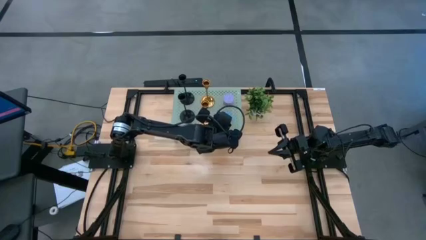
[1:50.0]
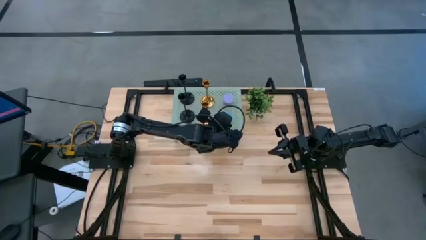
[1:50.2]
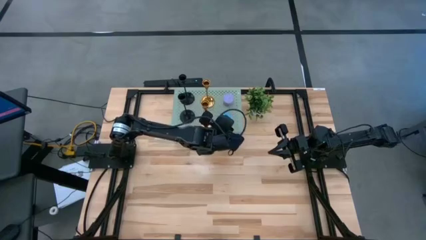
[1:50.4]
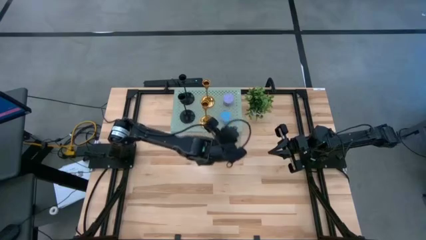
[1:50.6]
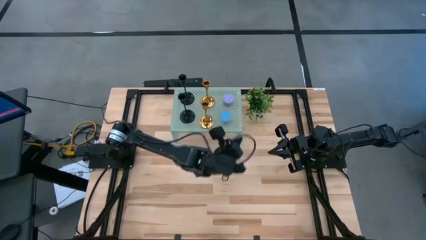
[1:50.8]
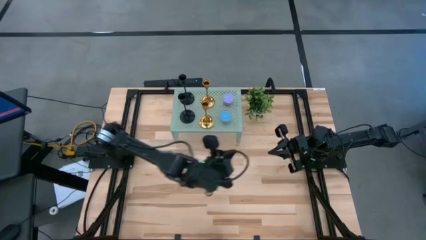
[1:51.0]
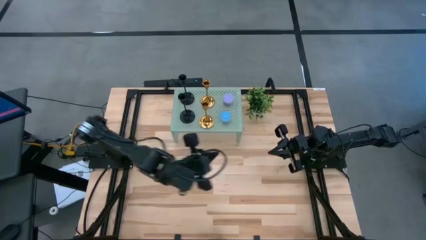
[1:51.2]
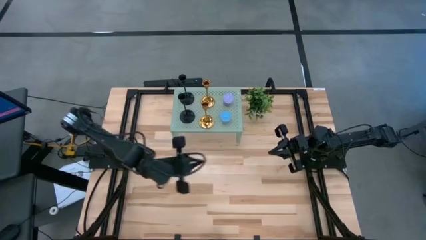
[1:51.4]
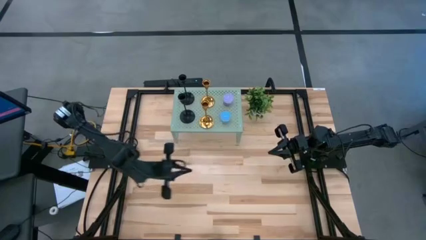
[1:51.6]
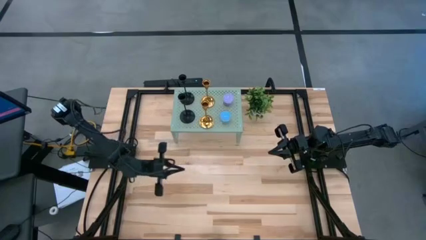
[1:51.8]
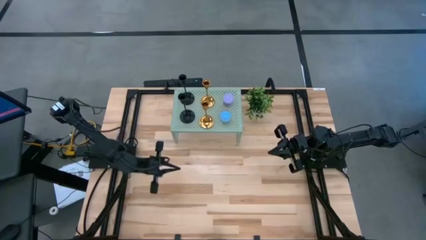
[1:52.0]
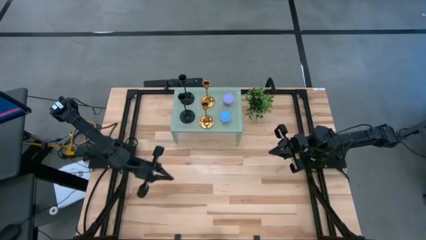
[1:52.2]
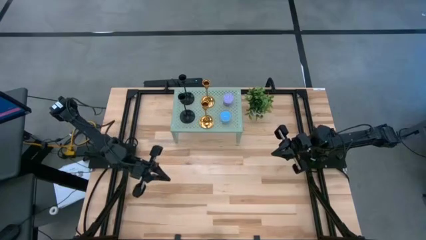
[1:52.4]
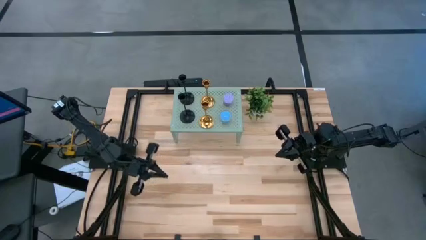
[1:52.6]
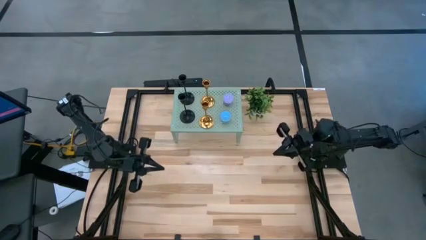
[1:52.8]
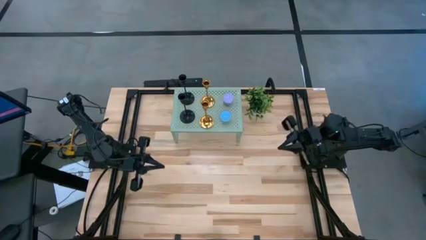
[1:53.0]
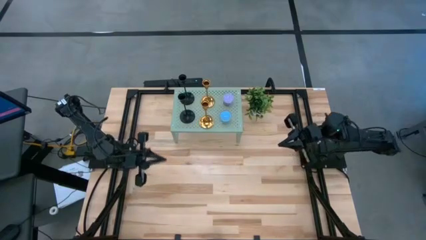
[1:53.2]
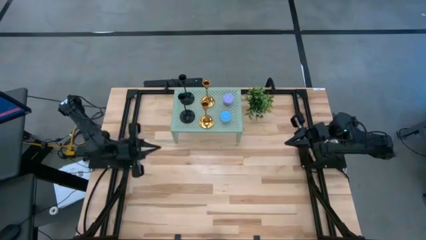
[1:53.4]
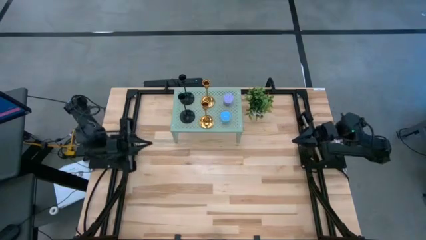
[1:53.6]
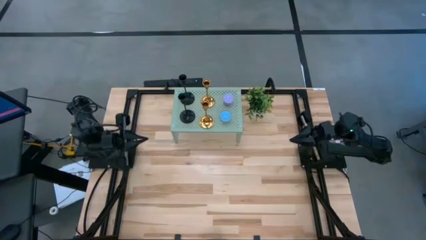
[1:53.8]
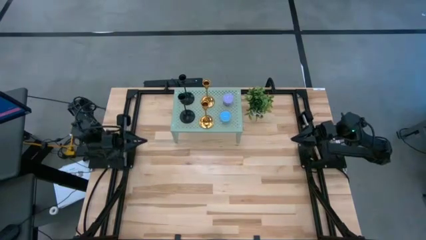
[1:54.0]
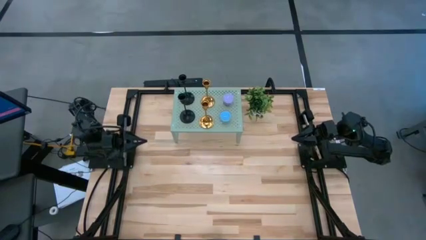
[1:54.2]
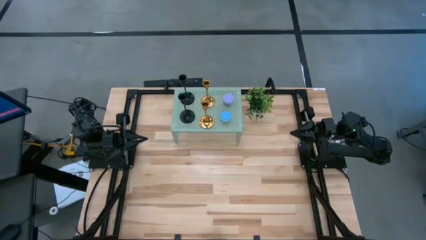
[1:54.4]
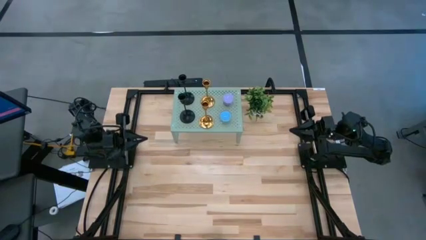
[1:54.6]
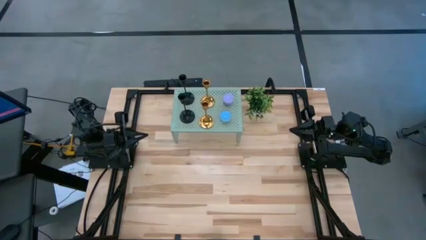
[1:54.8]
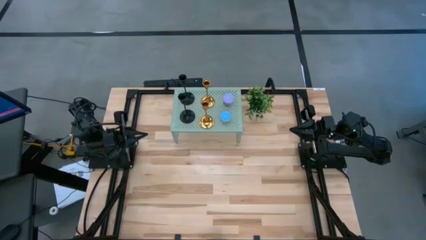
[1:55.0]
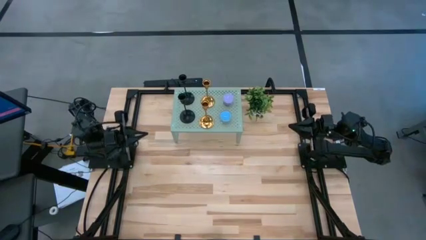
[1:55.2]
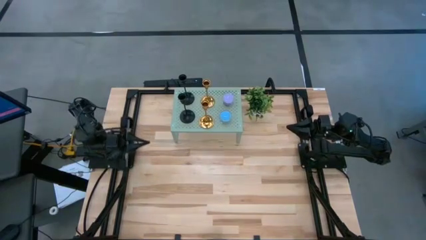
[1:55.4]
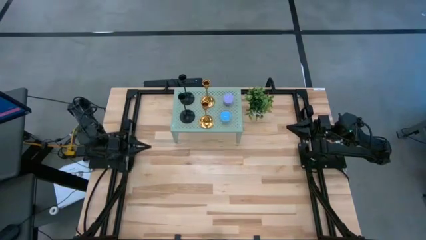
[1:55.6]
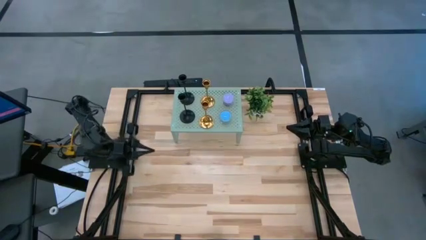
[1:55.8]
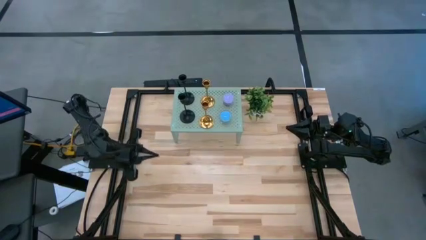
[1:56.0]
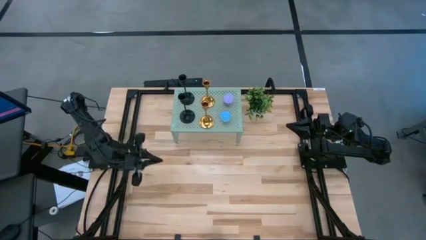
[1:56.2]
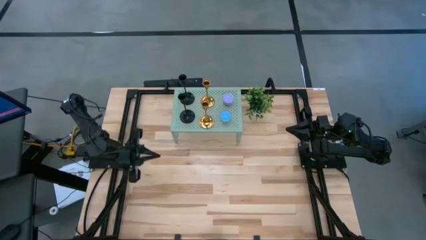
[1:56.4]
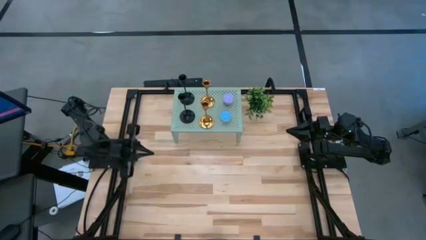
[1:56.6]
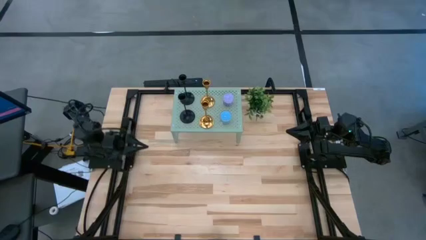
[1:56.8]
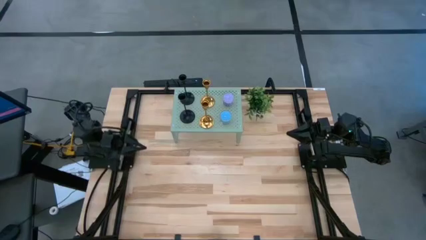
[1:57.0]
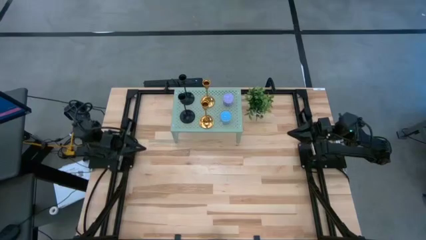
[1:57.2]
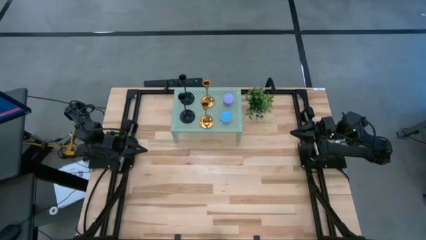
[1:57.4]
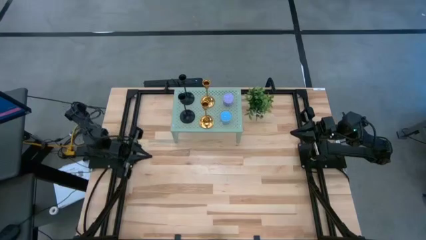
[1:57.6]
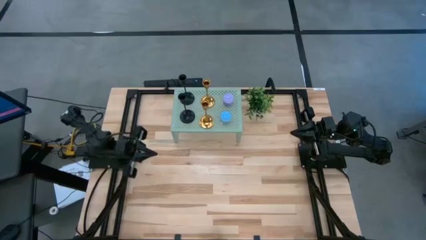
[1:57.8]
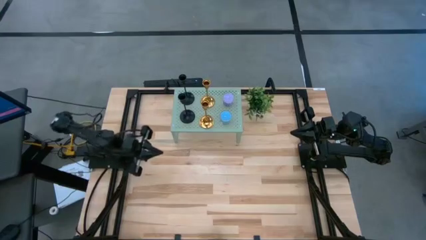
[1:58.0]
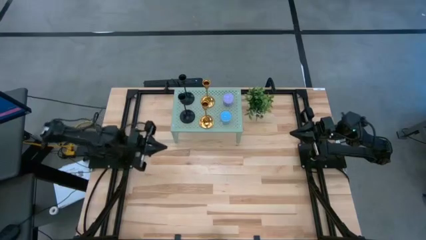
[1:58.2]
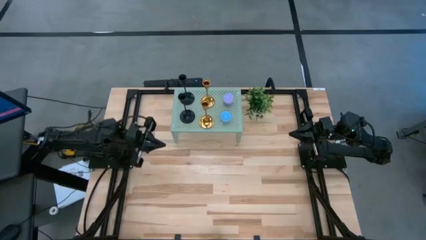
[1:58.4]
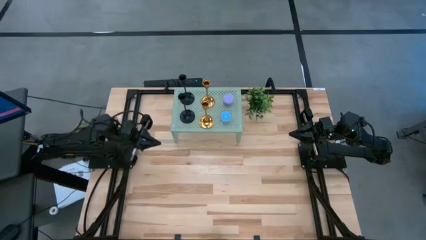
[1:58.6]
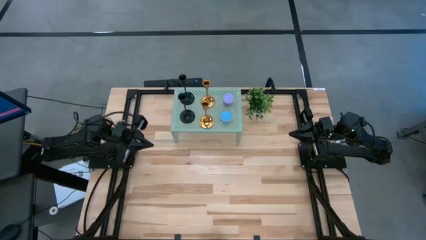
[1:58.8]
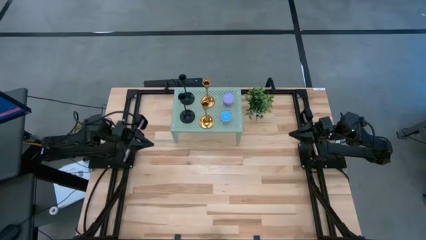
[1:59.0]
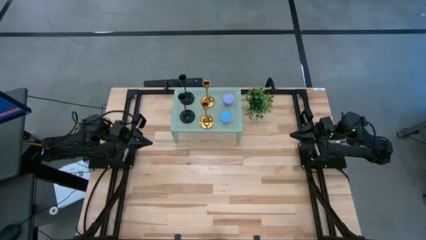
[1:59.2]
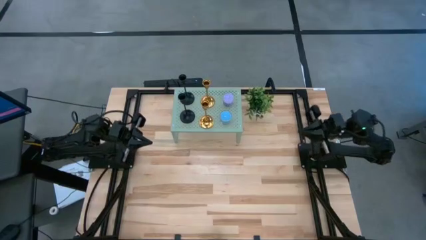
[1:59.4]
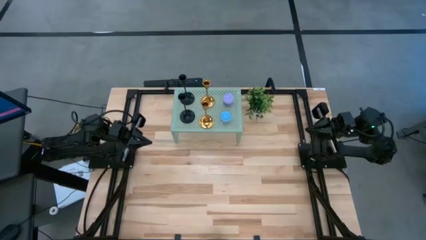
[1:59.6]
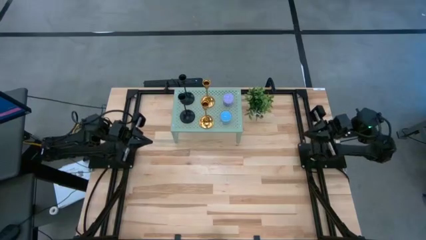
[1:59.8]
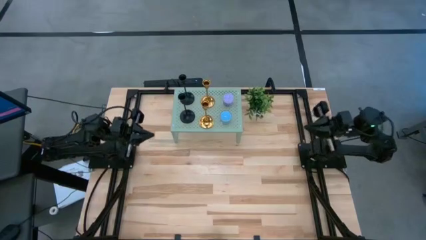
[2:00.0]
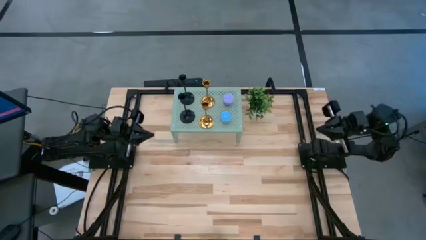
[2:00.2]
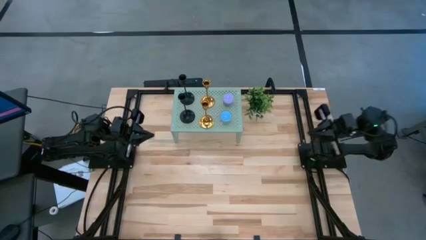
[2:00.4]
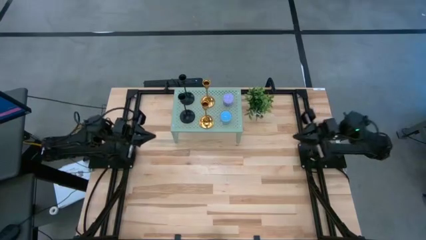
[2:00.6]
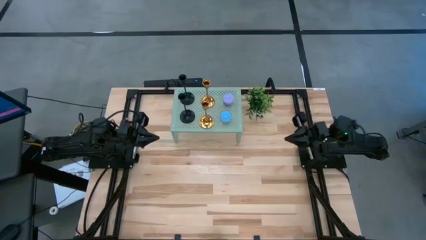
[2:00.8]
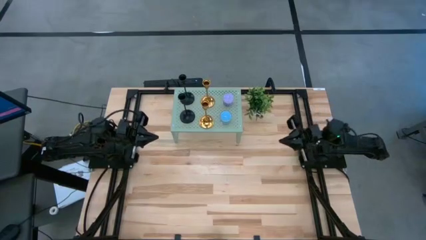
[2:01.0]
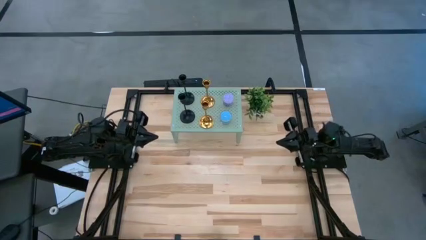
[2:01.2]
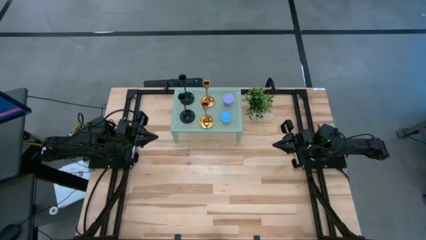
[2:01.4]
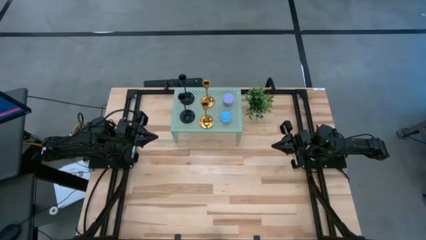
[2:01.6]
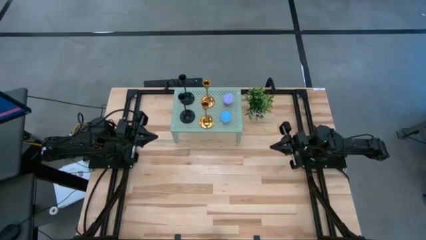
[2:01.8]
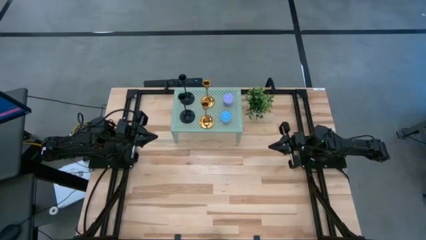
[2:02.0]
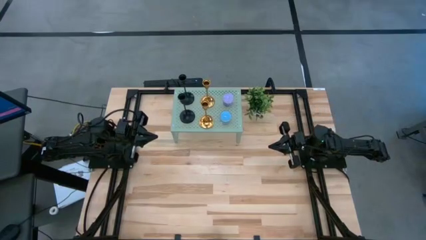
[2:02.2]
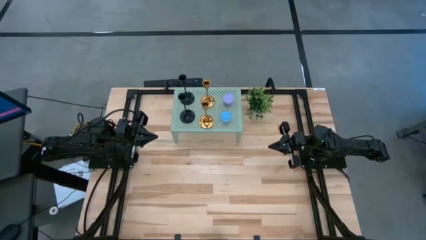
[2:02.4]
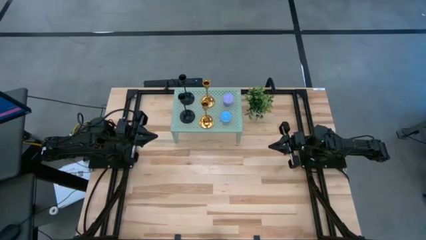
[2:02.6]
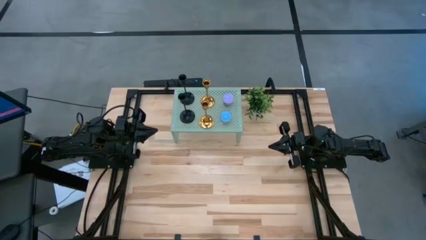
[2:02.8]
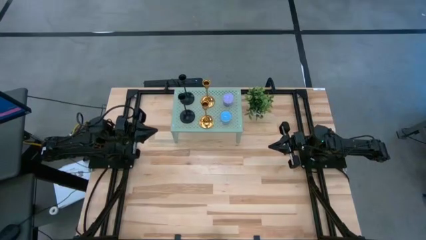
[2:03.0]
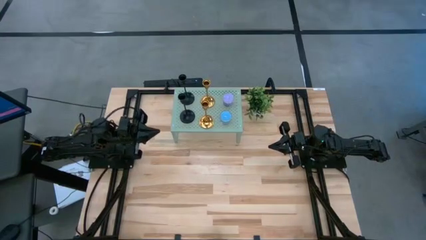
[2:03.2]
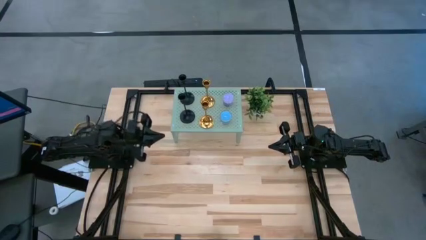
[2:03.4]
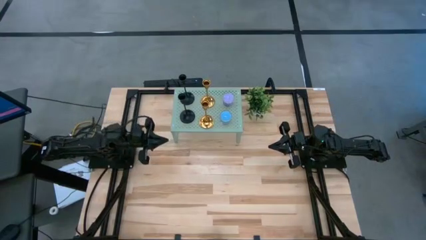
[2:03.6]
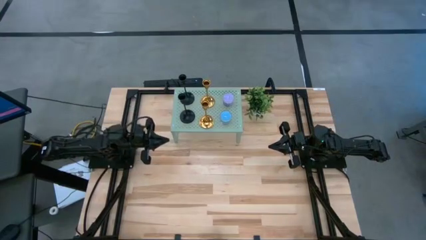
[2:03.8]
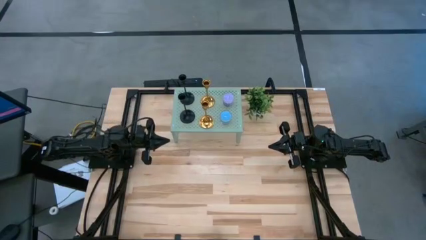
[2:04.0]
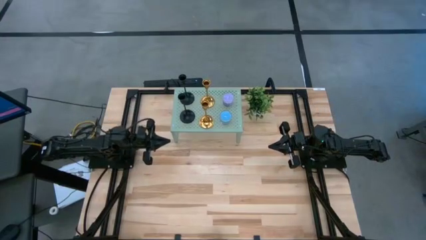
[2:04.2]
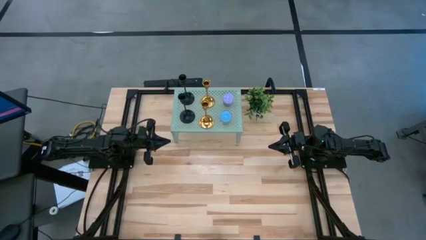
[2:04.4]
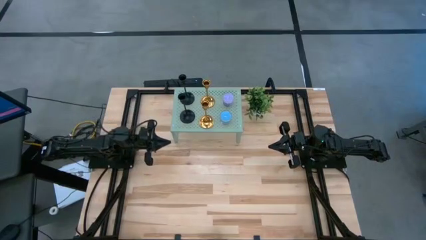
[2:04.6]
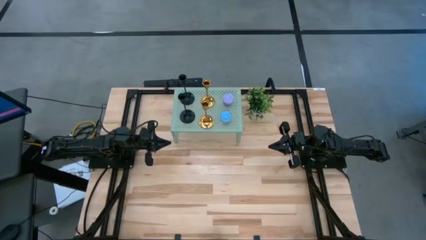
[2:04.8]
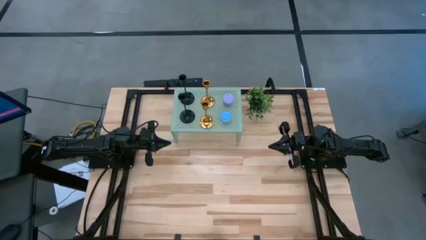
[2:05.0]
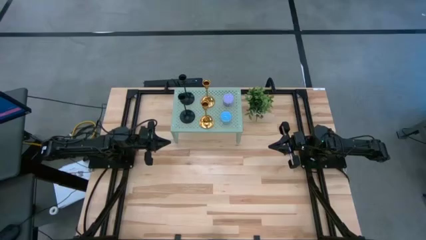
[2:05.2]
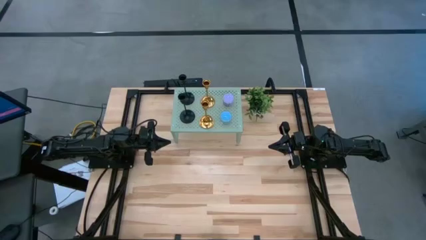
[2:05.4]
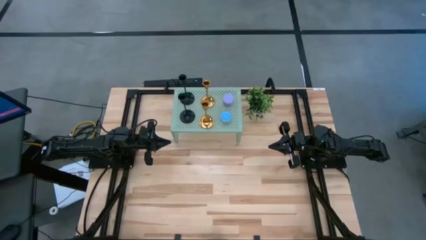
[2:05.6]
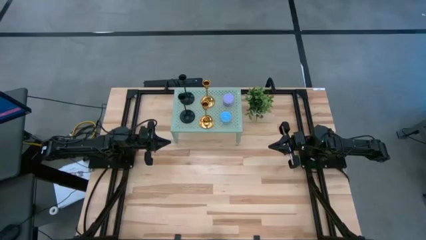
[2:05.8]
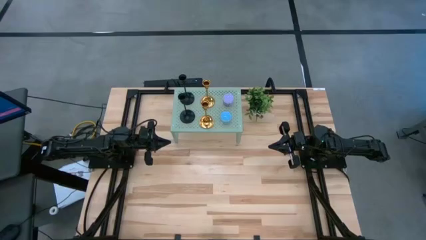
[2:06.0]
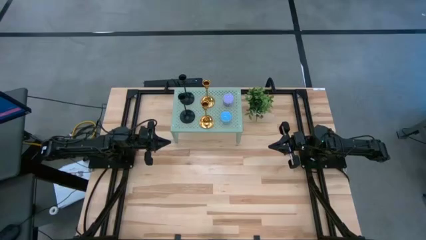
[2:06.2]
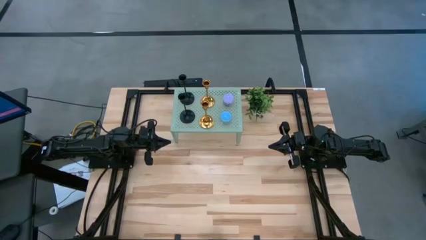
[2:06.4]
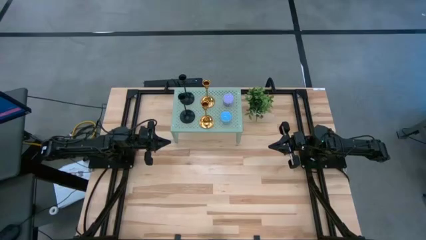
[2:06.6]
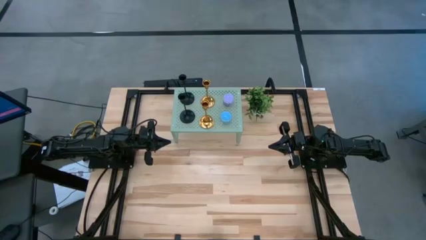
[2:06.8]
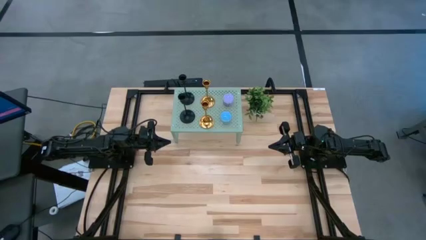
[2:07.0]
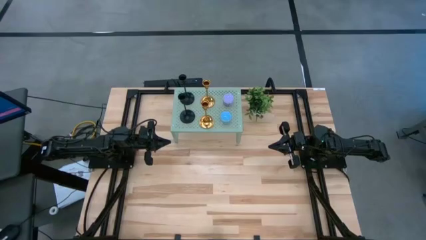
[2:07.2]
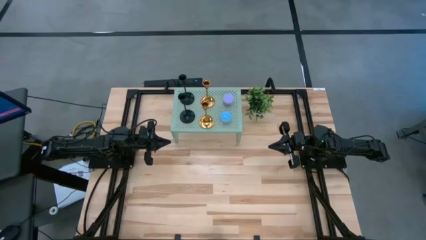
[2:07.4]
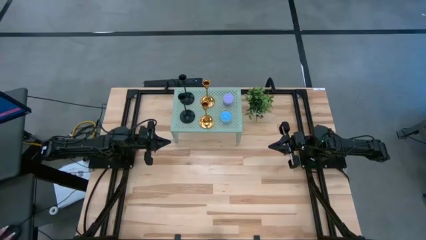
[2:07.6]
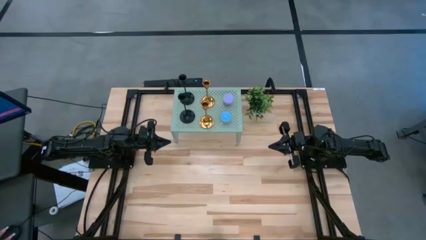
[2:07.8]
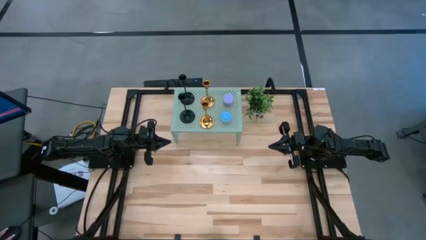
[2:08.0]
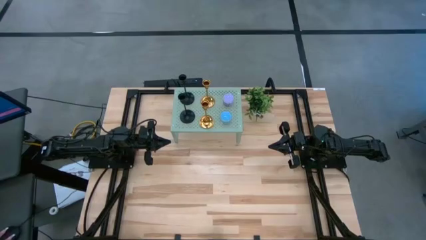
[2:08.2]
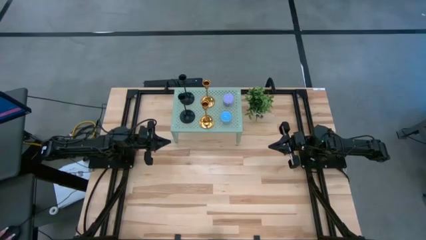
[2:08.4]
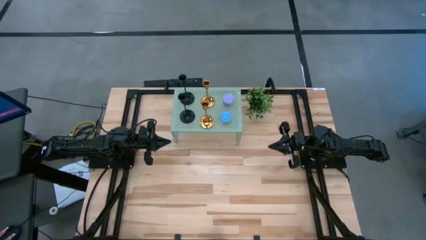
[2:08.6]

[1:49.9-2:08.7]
Task: Pick & Place candle stick holders
Return to Home Position
